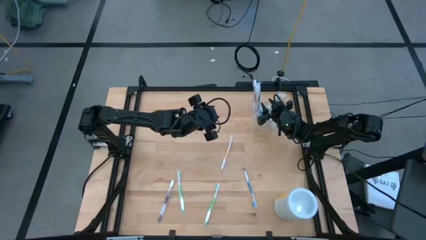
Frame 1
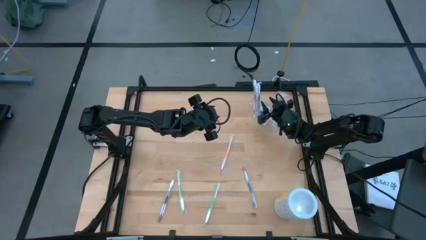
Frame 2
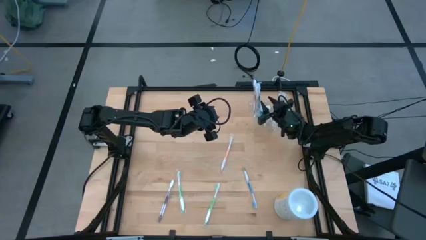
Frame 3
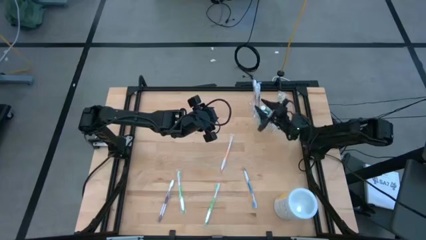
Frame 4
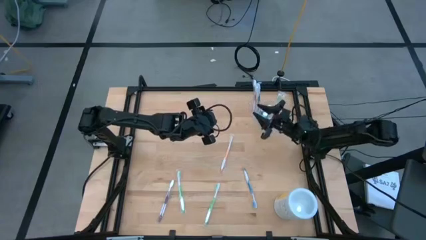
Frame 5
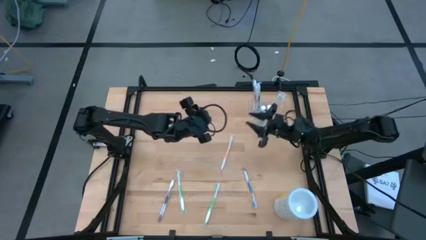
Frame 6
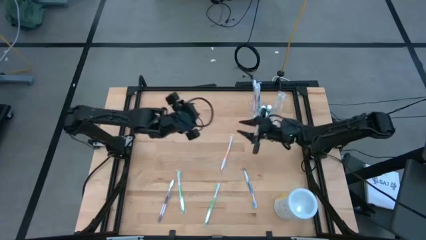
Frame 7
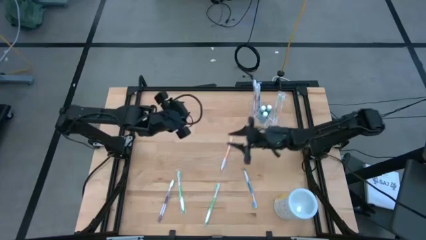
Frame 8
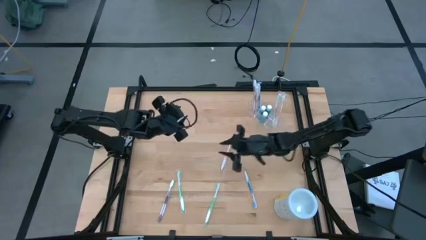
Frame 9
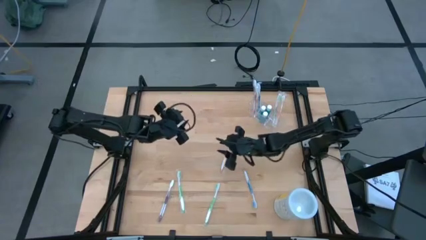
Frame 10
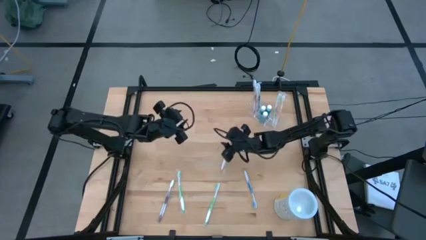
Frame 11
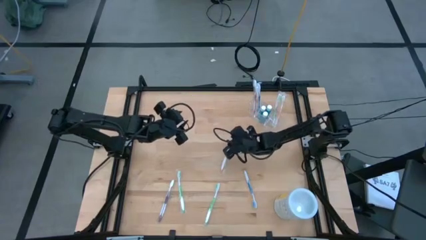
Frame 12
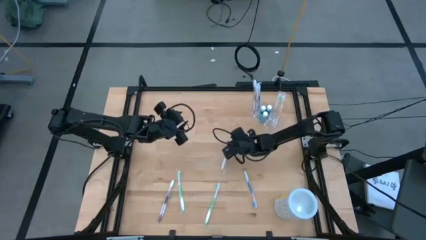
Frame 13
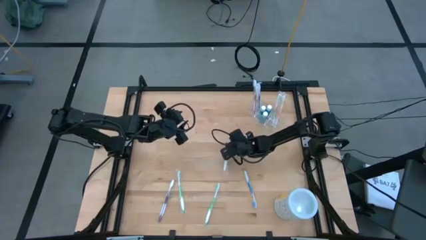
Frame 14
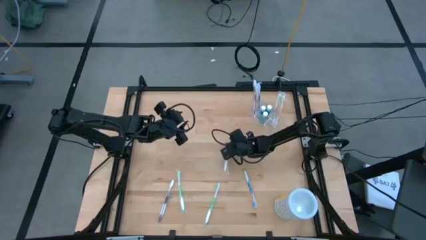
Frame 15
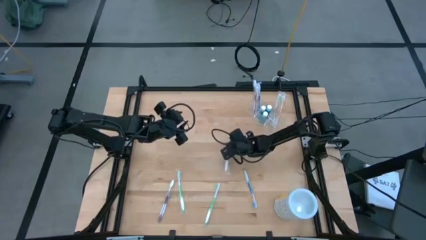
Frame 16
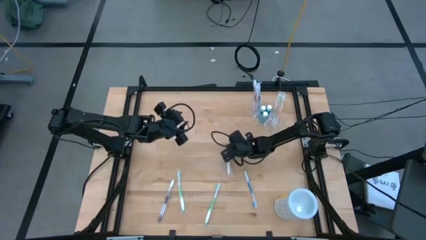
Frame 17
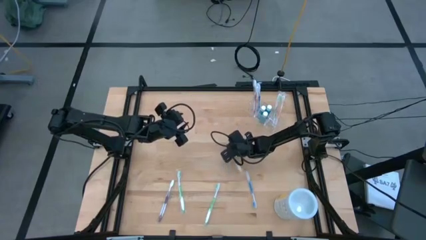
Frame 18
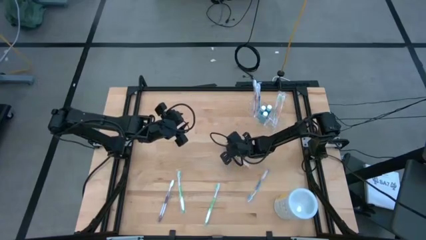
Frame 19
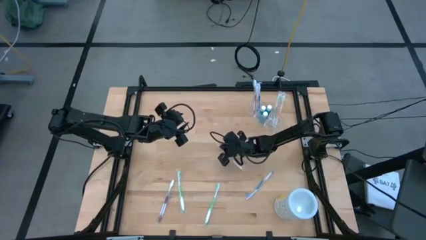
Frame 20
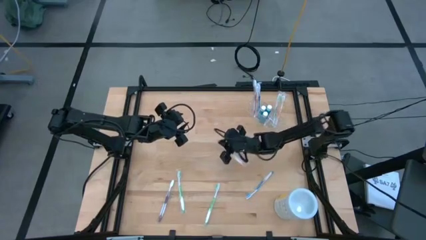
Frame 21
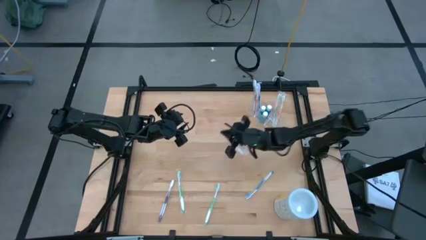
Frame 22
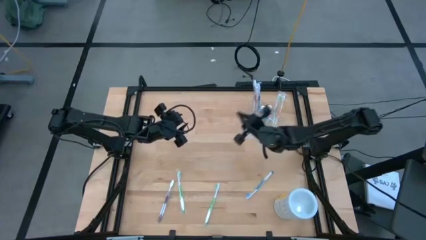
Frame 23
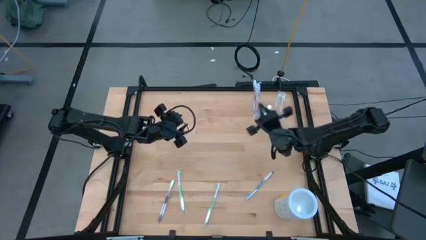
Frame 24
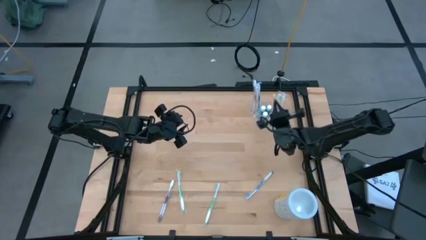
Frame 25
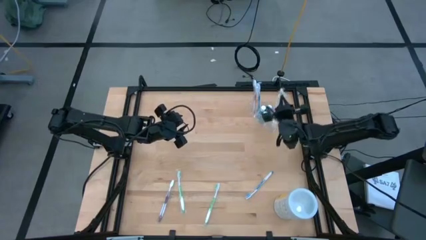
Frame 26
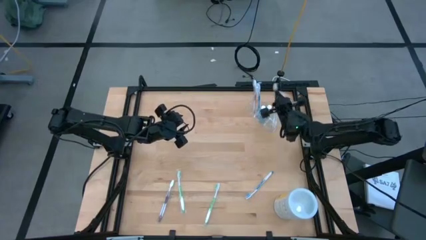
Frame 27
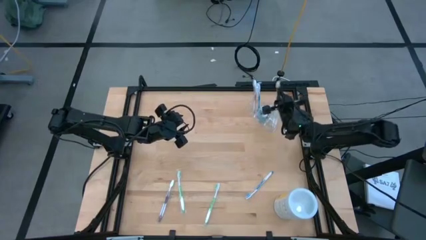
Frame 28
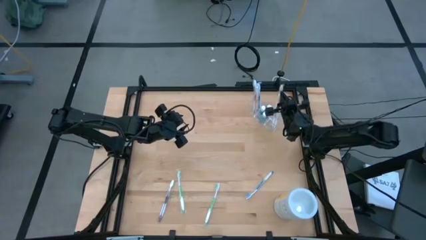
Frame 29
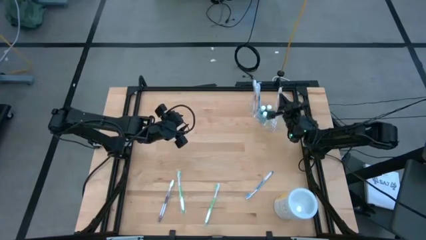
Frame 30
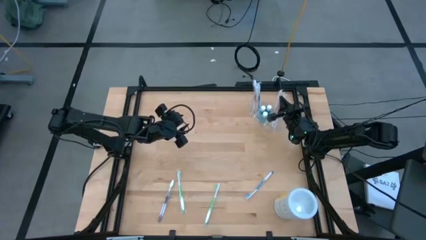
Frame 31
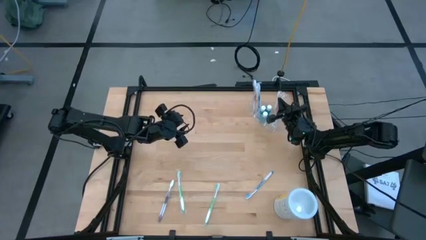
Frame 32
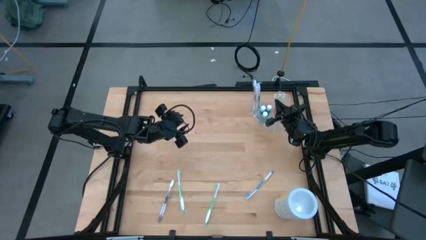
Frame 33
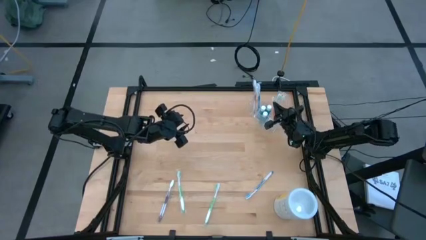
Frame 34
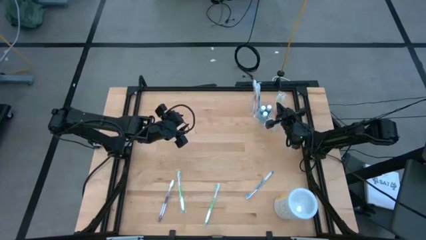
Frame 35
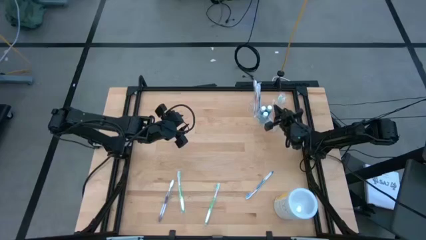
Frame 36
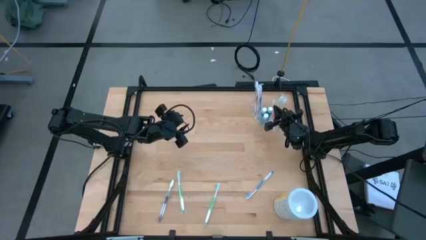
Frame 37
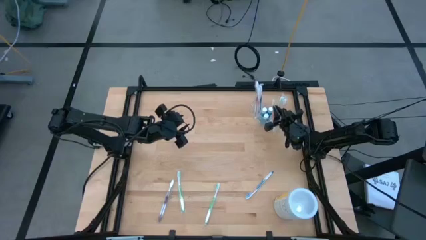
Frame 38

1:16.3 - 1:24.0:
Task: Pick & Place toothbrushing station
Put the orange toothbrush into the transparent organizer

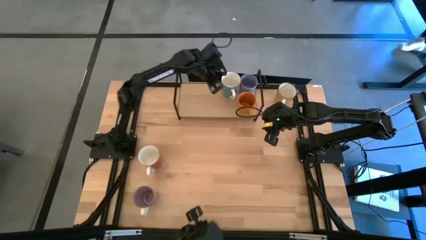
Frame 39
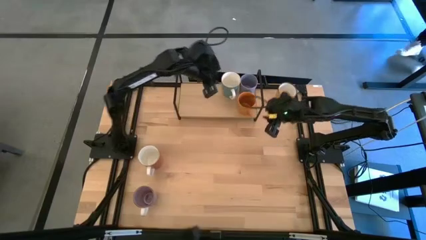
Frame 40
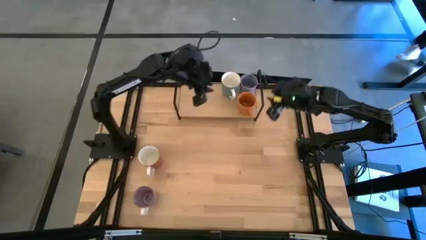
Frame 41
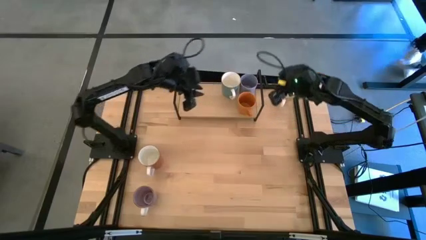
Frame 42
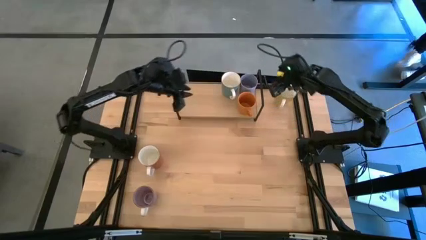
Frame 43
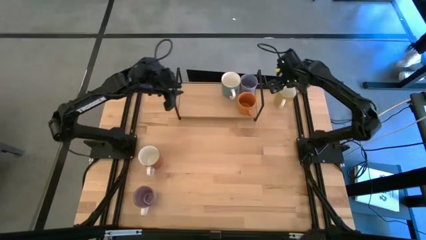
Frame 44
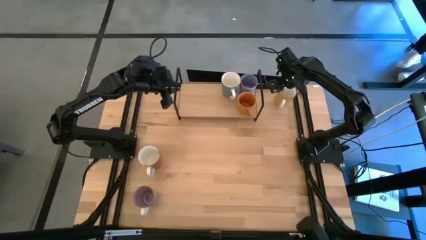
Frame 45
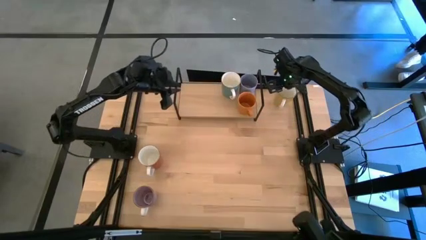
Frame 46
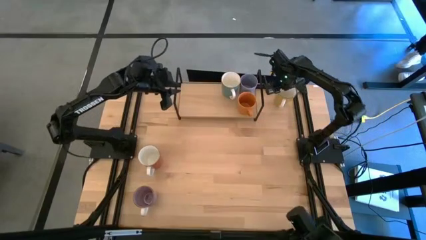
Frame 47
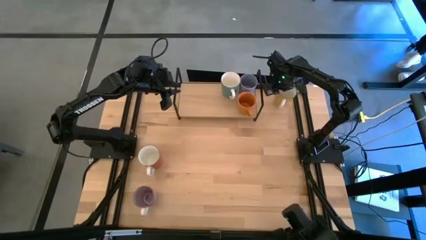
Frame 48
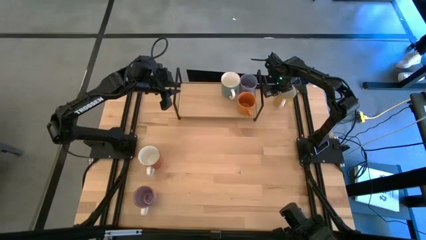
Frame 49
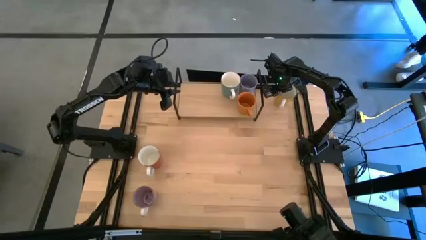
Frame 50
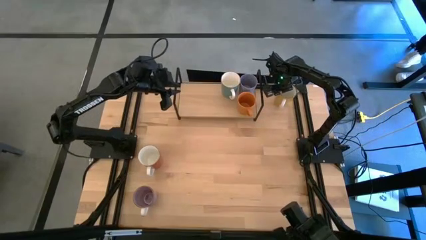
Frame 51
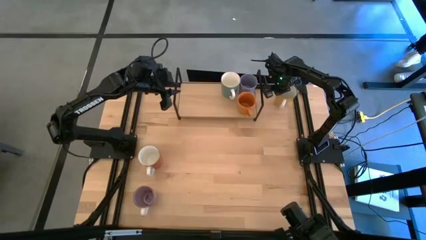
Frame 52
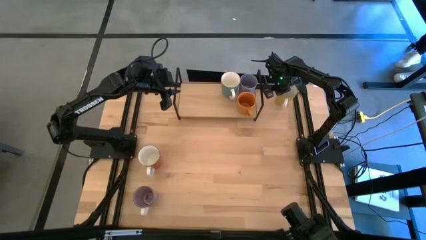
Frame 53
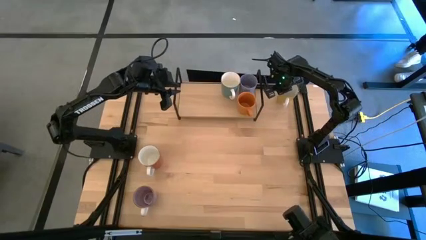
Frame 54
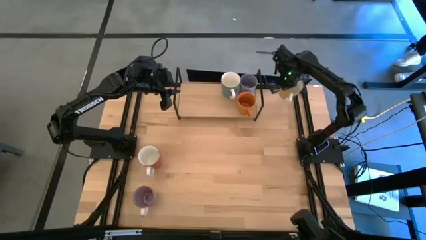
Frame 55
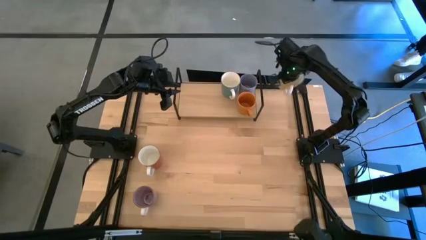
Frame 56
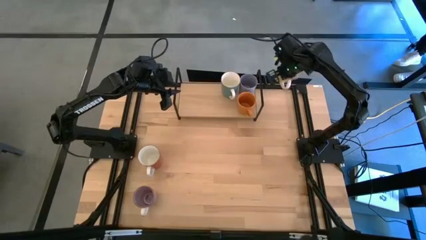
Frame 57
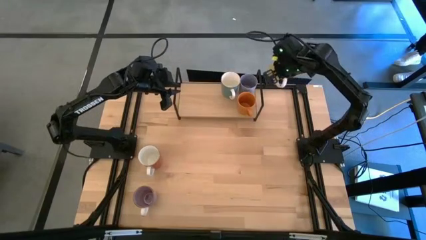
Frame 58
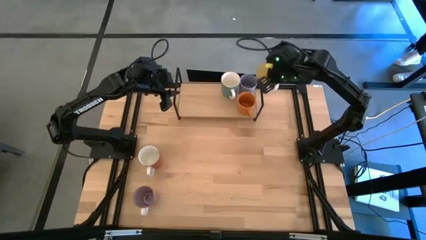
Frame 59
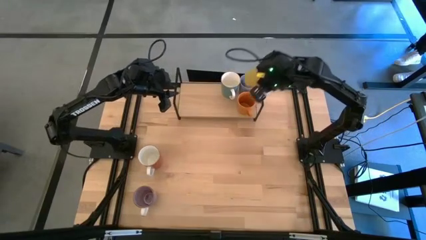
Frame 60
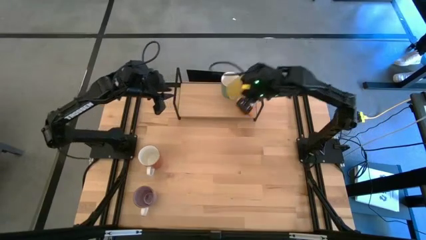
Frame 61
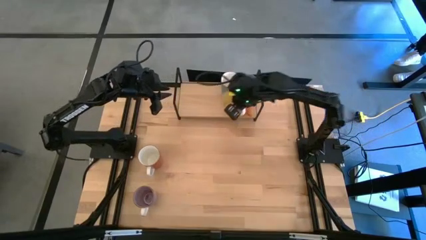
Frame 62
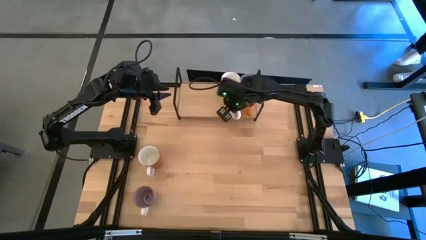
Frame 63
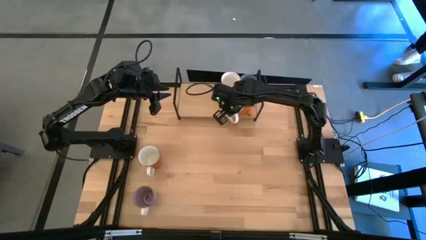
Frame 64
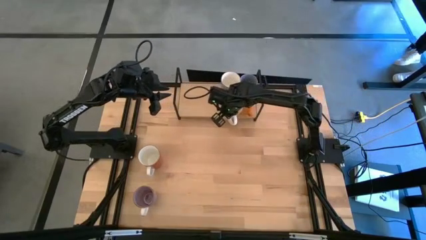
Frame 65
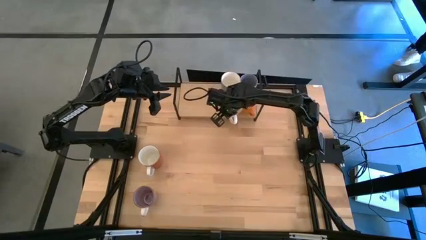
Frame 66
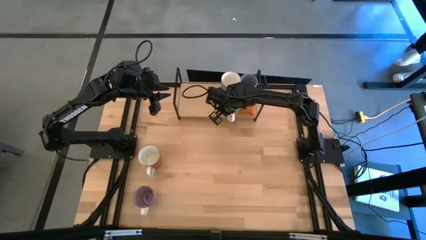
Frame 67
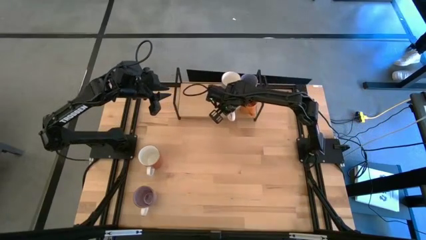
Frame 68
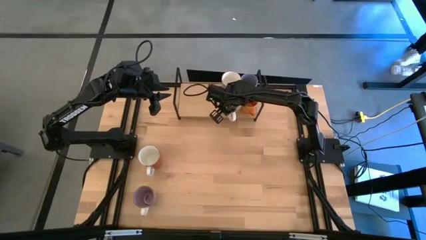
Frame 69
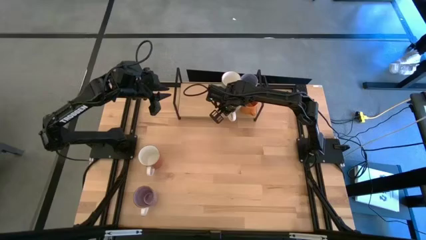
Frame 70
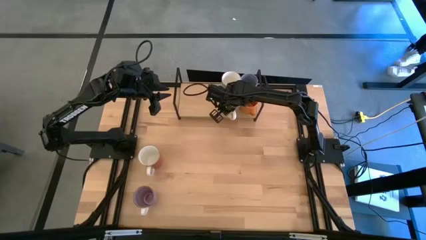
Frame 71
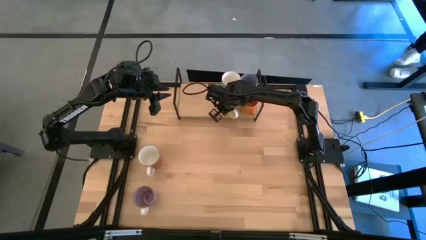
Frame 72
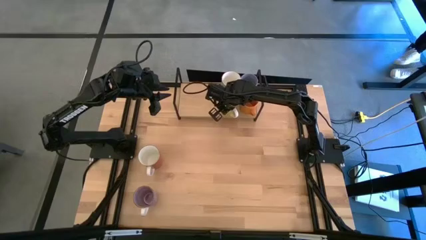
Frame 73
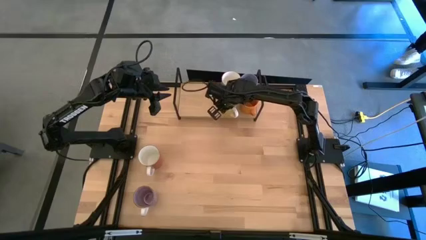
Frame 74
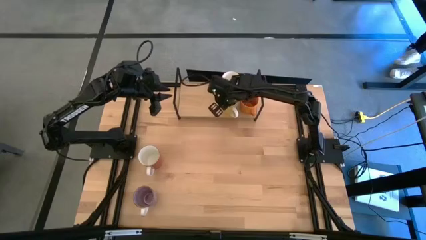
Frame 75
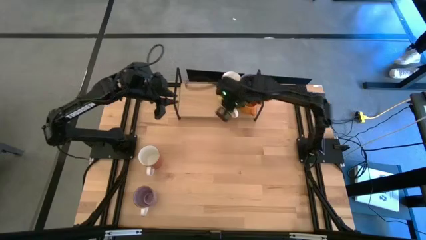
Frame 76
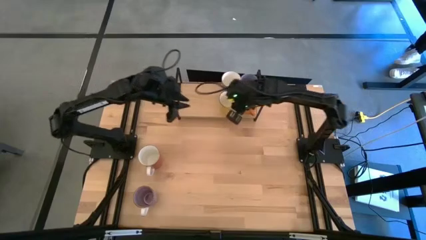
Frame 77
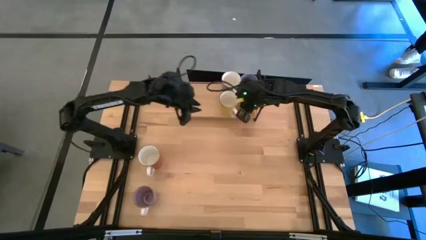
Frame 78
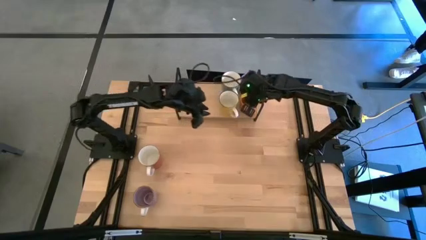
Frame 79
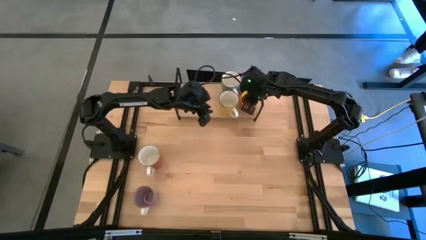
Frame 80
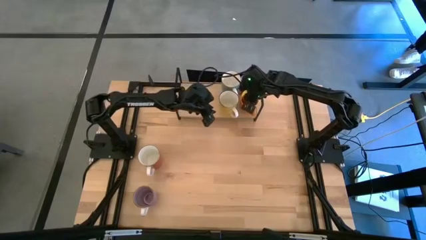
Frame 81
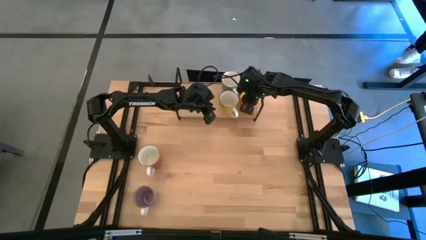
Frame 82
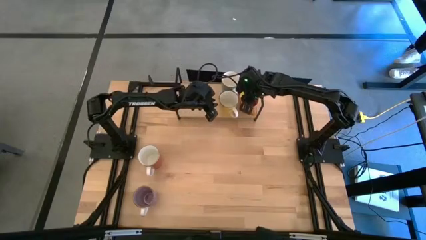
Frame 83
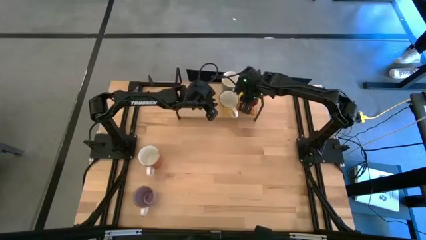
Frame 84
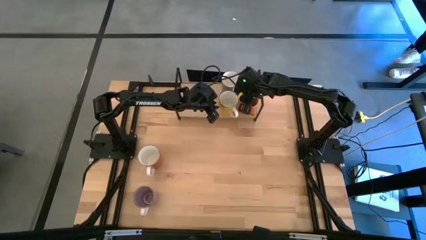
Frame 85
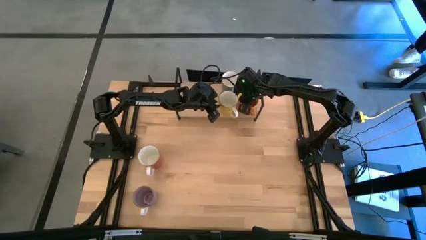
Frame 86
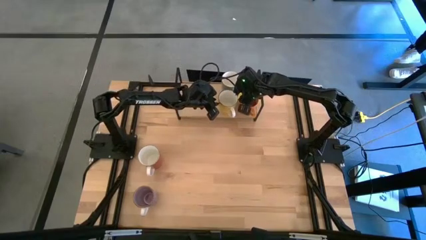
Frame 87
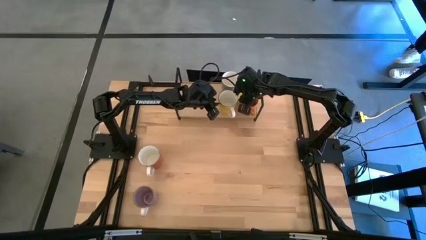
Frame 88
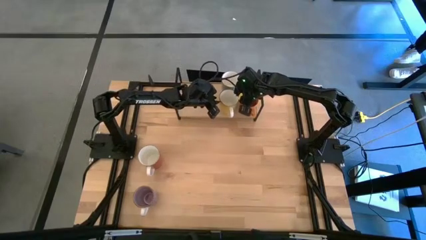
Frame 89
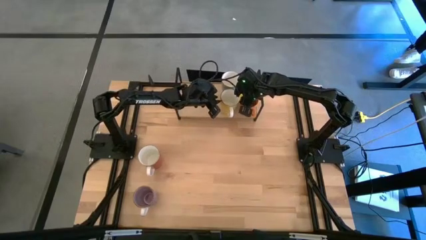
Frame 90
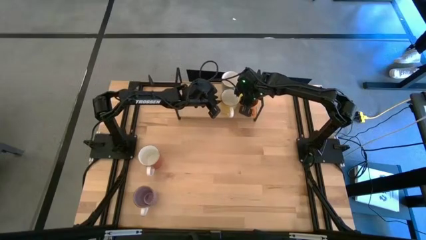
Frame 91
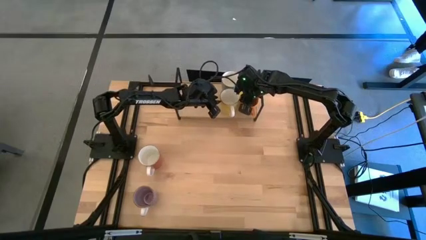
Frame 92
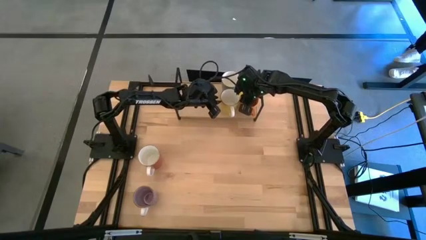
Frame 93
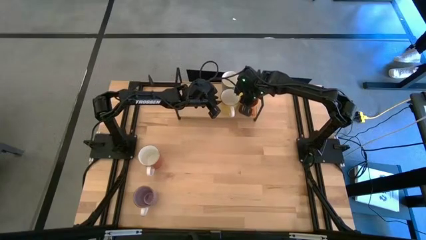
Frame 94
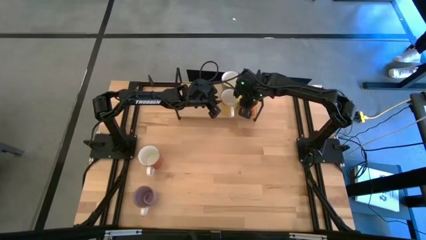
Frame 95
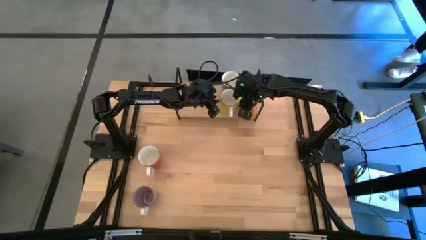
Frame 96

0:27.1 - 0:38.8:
Task: Place coffee mugs
Put the yellow mug on the shelf aligned with the light blue mug
